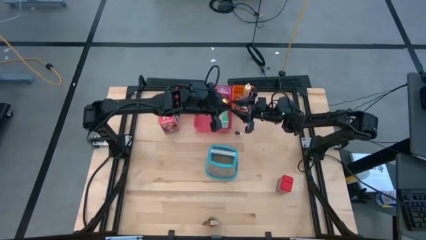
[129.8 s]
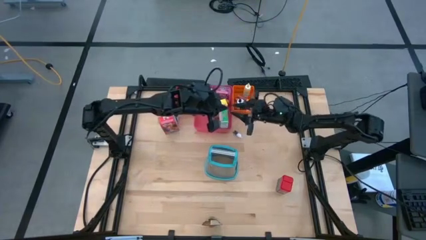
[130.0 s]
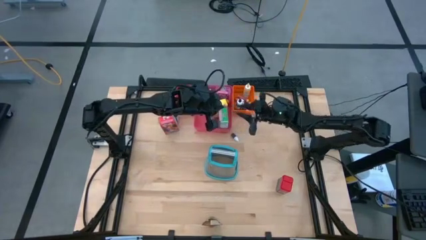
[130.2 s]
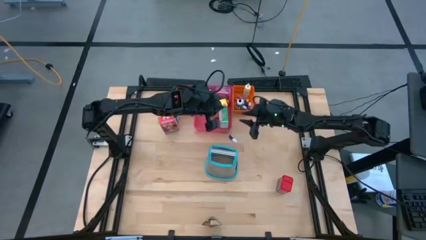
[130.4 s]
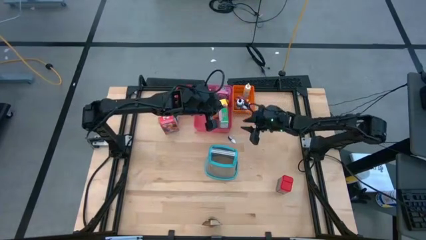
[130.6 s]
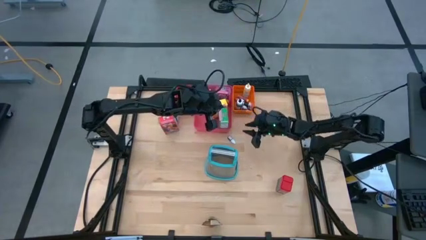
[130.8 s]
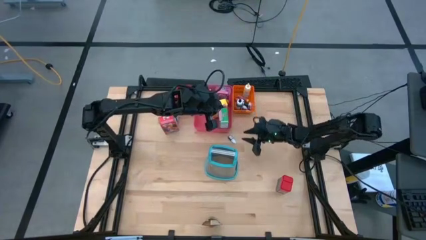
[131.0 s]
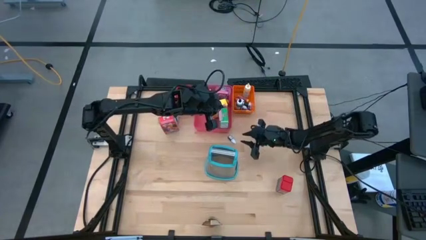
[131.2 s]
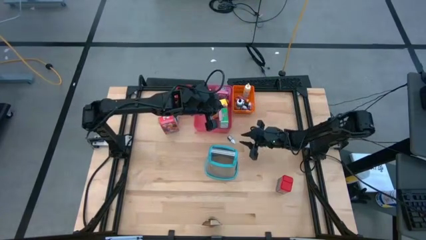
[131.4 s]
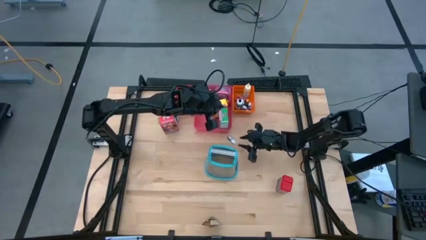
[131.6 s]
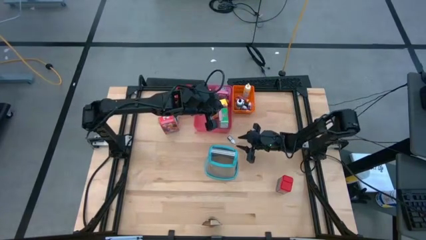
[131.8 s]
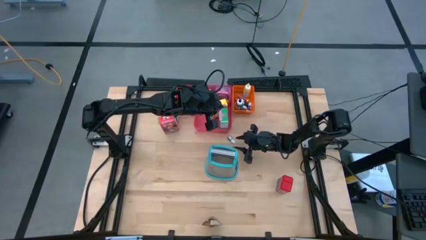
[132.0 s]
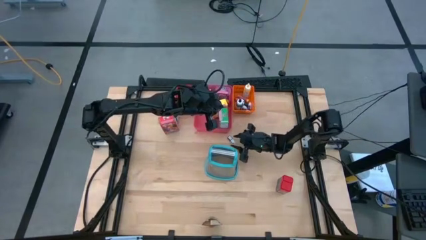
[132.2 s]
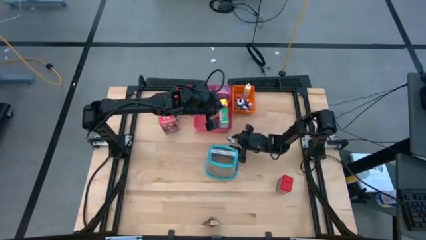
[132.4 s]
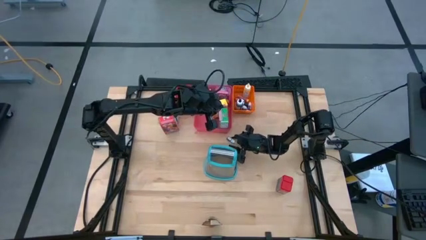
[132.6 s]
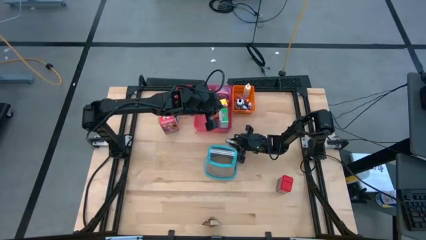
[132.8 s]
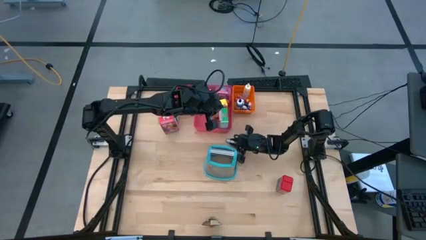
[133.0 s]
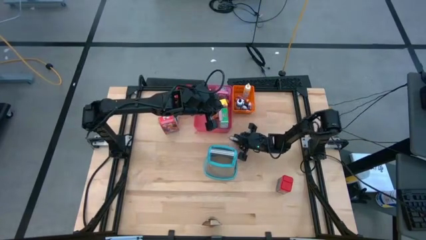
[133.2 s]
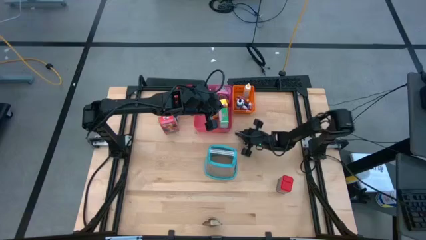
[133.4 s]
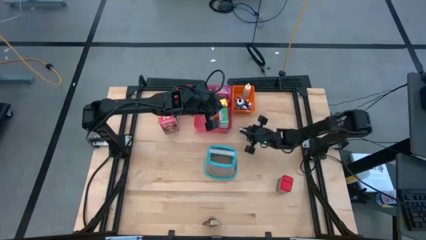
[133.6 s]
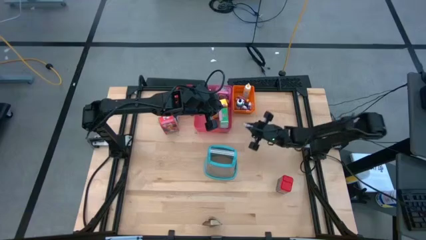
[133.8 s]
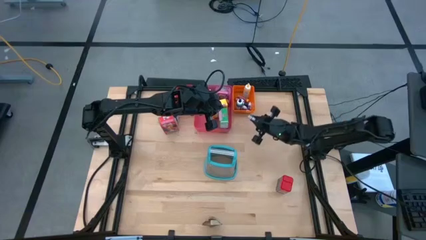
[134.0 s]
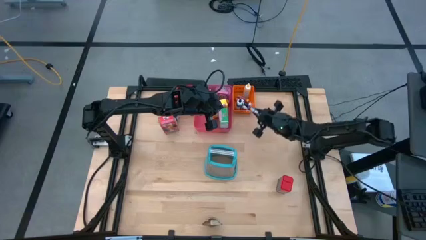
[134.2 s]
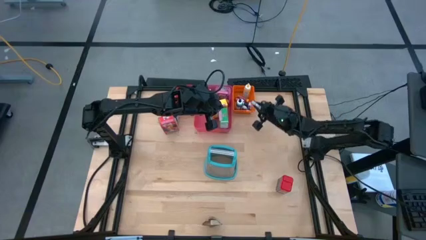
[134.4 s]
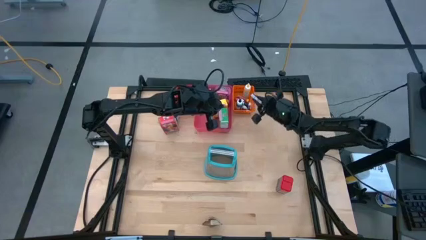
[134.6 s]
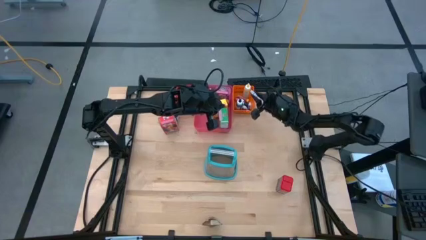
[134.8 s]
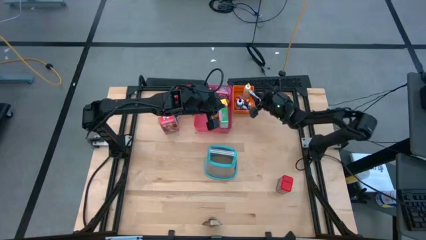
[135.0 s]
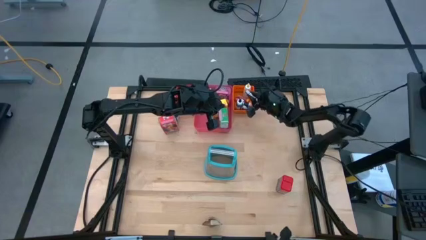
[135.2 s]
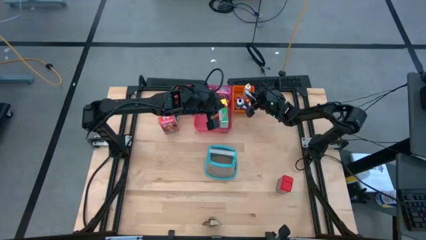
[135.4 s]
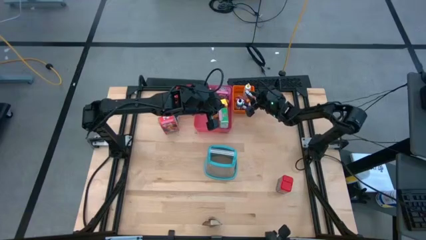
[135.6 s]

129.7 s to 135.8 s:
Task: Pick & Place Kitchen Items
Put the small brown food coloring bottle into the orange bin

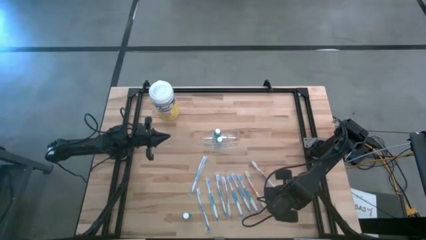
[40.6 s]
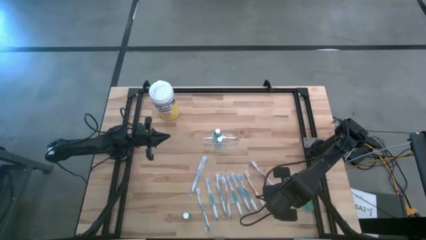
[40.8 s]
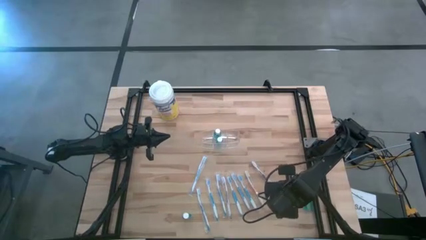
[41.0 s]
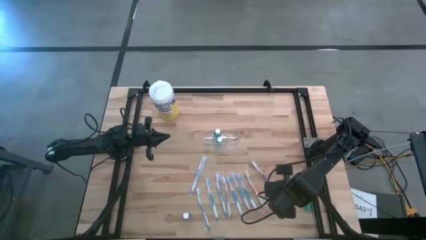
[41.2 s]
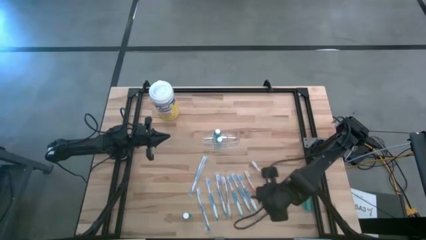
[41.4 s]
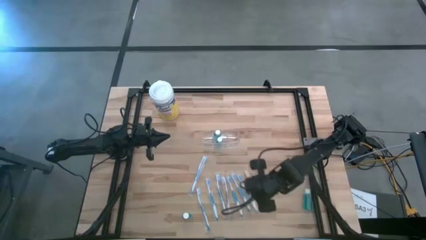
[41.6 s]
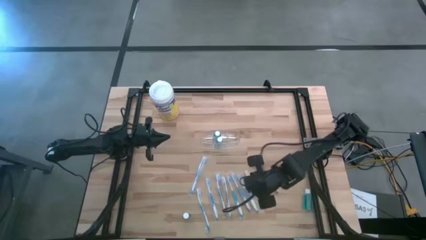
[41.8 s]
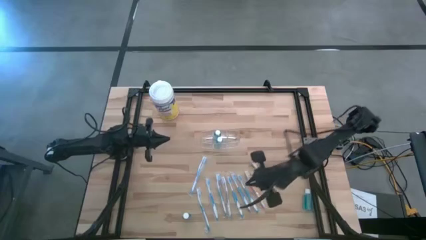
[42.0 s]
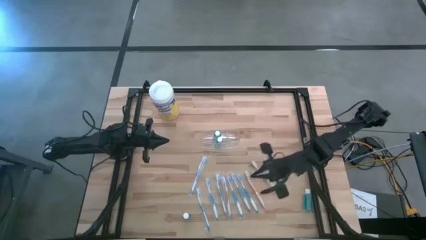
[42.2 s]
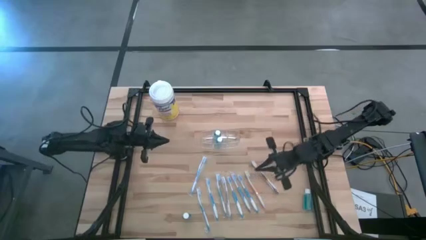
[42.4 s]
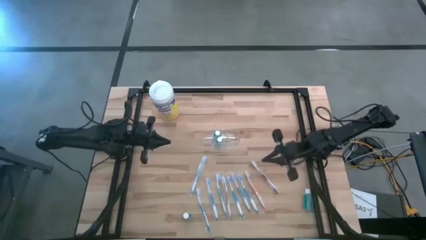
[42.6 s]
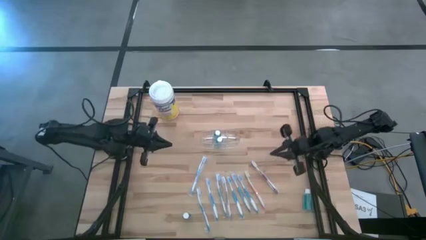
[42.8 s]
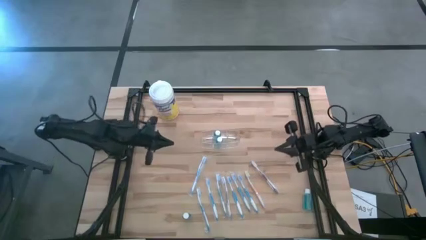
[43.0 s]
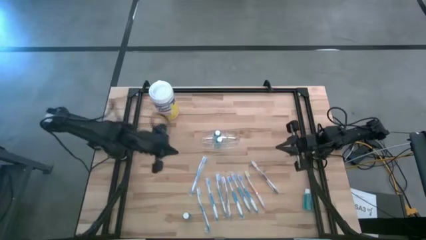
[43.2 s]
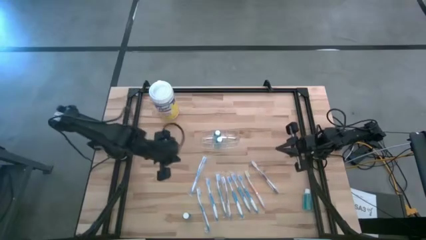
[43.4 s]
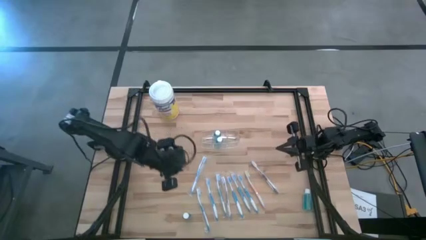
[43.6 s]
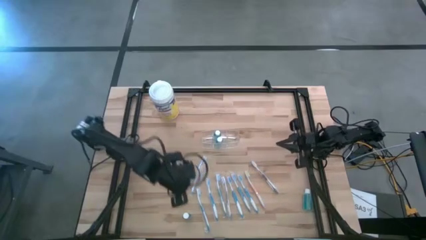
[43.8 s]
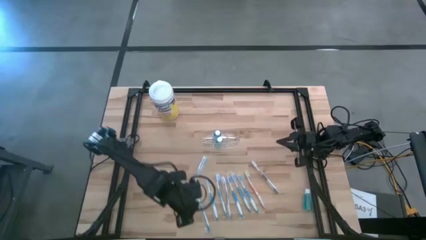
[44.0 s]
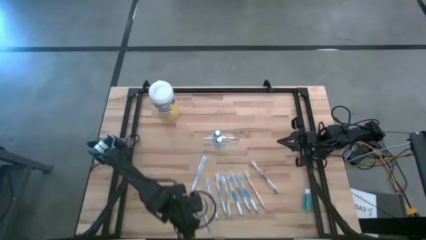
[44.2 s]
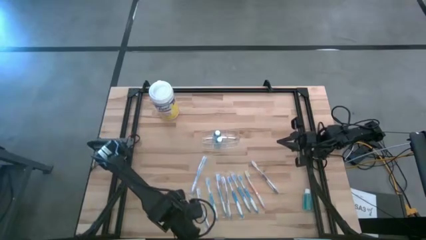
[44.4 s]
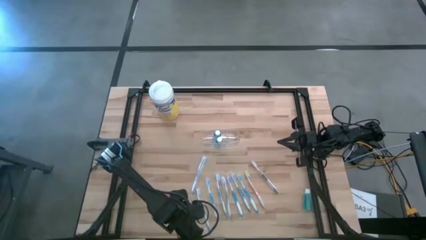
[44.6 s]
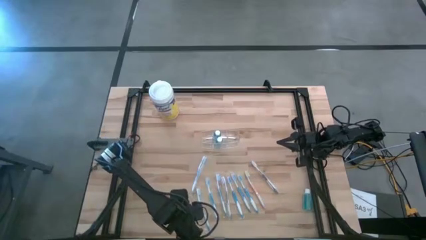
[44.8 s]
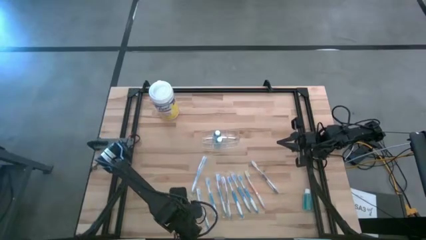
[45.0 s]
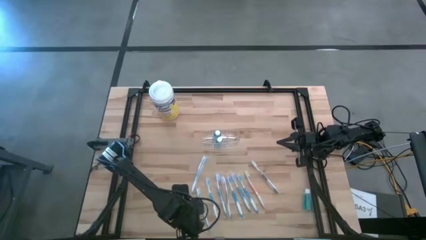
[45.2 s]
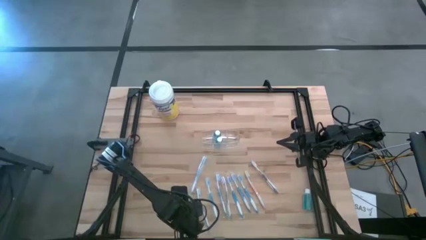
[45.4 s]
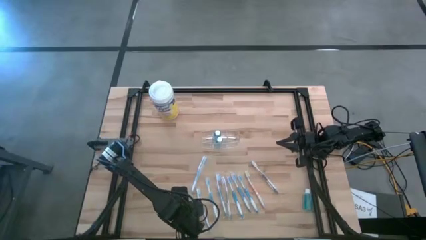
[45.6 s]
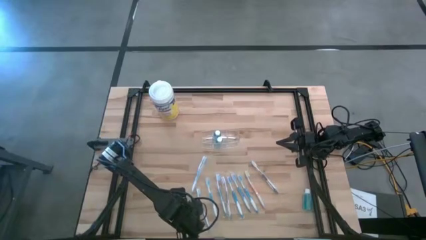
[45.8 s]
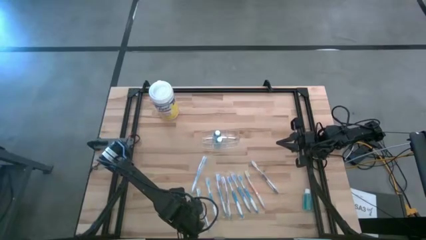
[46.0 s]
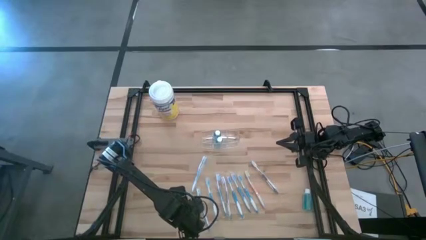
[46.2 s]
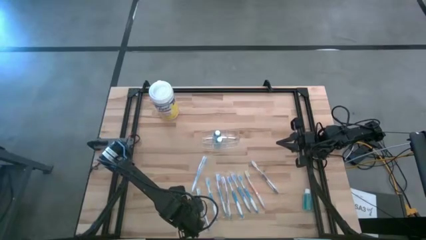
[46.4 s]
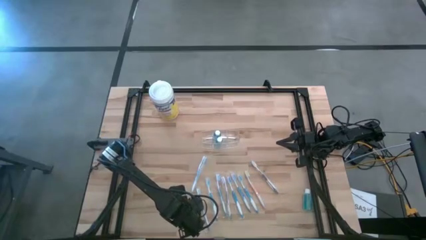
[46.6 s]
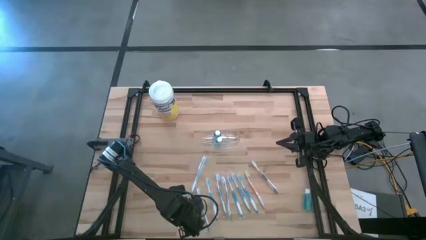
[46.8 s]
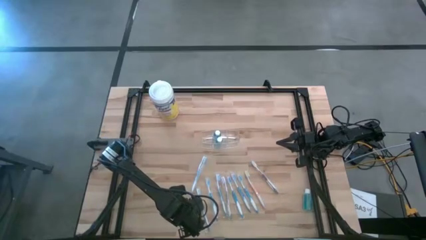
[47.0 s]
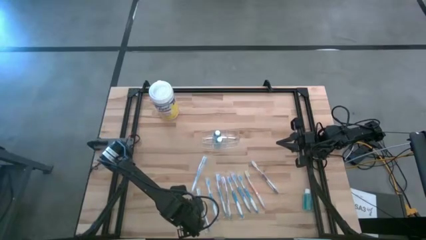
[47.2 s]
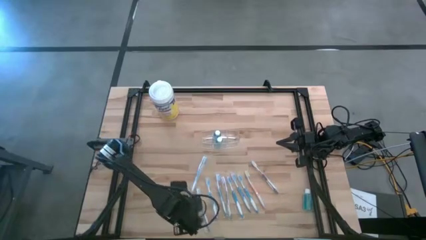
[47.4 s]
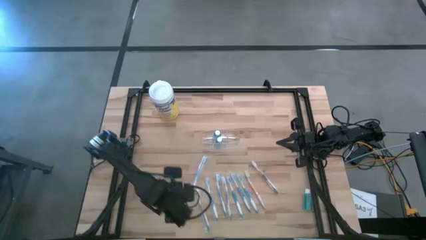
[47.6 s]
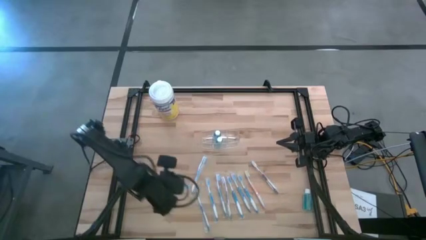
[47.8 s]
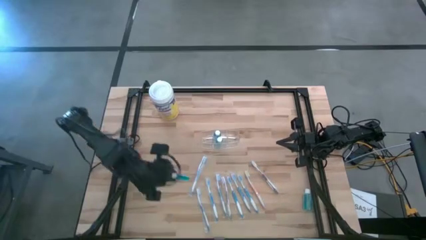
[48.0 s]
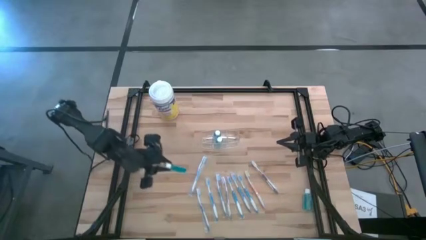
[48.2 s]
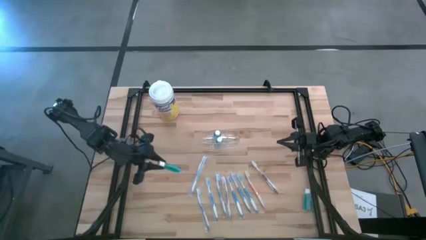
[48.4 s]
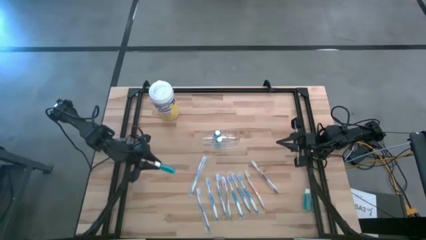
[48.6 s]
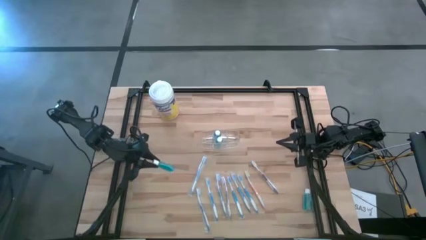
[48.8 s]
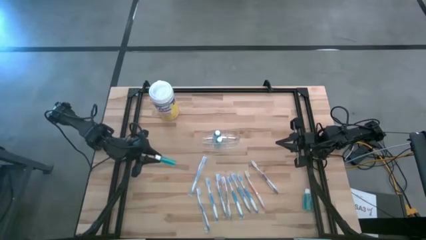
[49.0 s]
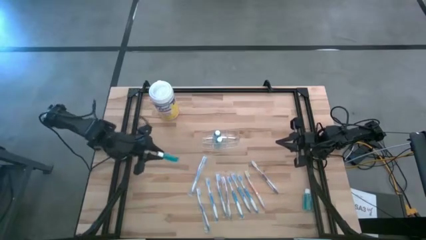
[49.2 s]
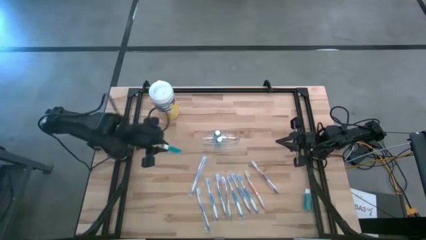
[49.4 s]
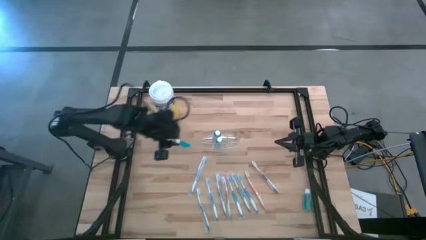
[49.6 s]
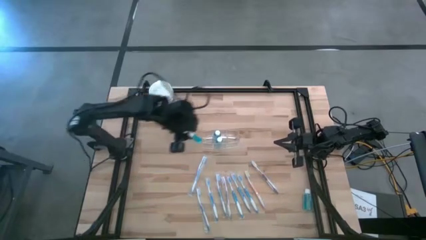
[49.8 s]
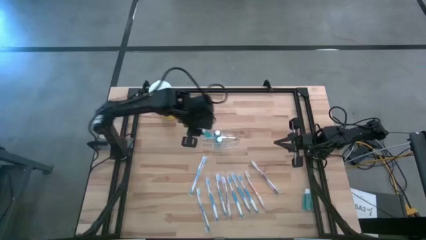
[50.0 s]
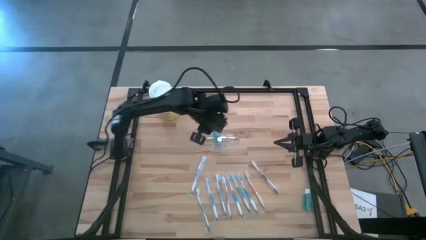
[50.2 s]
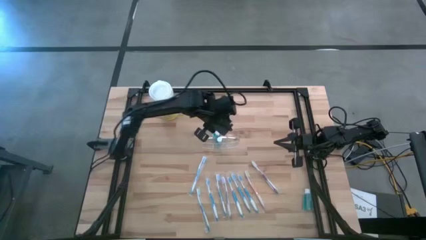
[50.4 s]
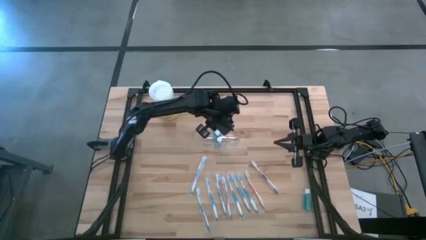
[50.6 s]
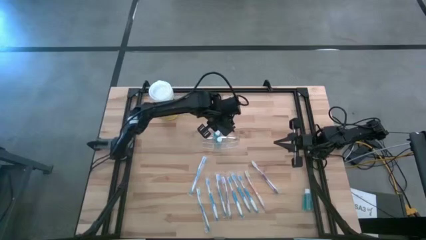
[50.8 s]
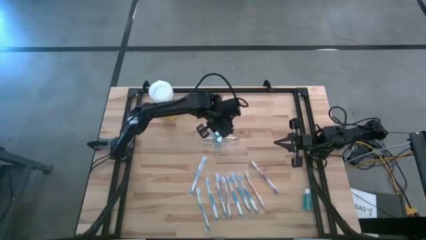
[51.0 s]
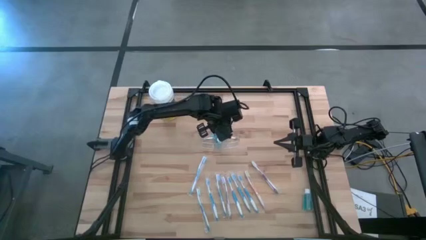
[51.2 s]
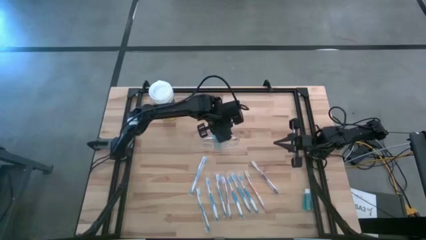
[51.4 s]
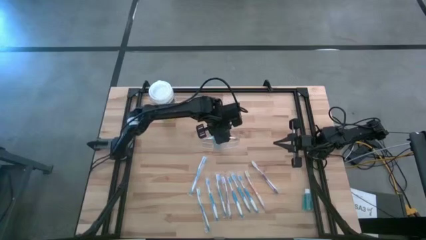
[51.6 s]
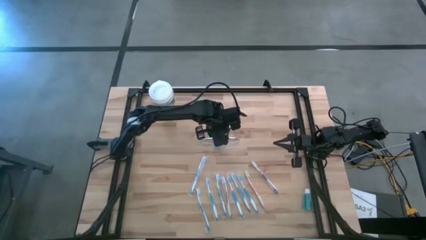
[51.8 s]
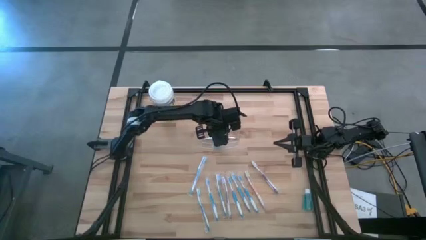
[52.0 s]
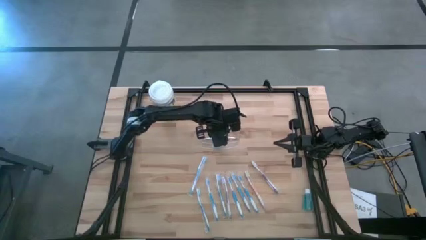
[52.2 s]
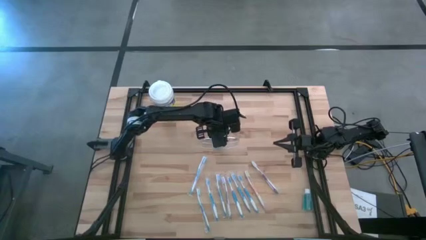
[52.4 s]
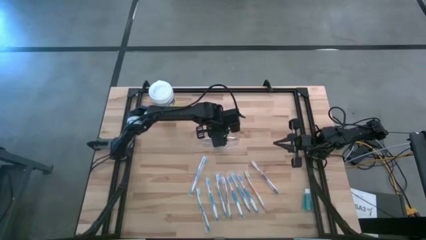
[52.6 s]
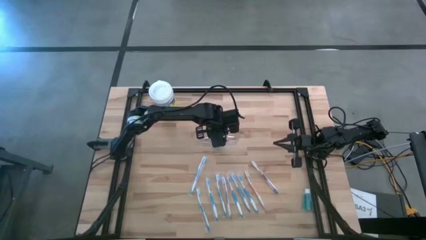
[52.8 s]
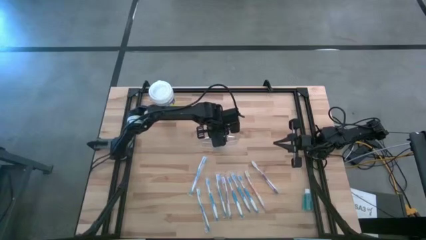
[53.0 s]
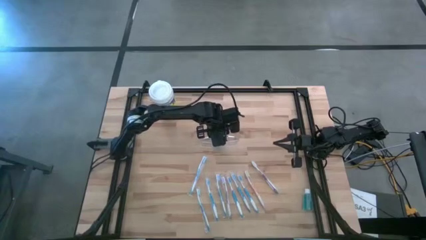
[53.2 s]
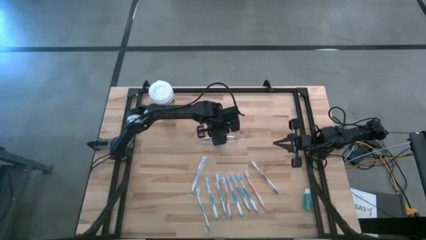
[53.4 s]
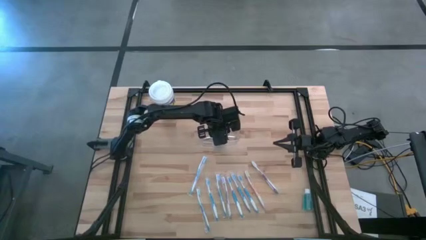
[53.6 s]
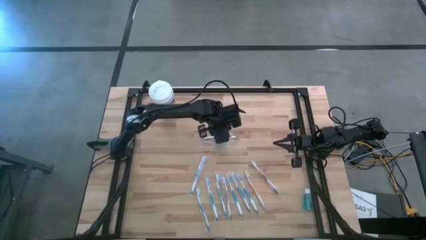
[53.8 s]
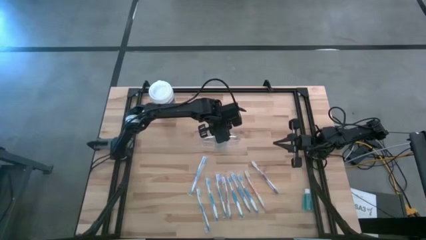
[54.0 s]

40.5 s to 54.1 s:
Task: Pick & Place toothbrushing station
Put the blue mouthwash bottle into the middle section of the transparent organizer
